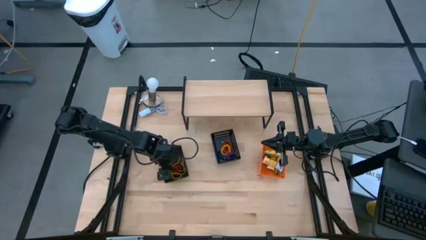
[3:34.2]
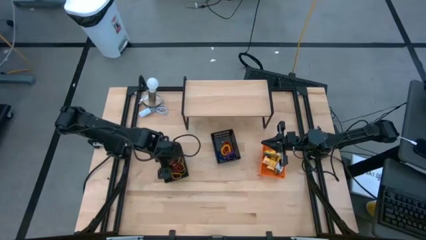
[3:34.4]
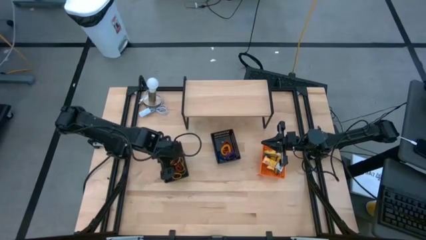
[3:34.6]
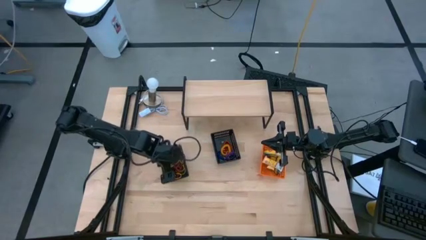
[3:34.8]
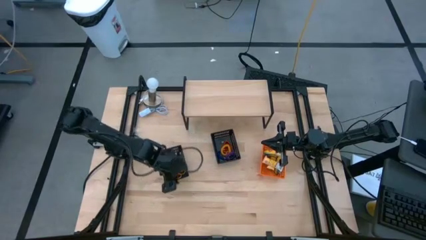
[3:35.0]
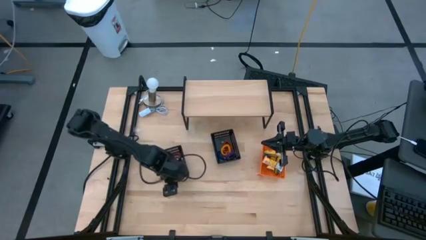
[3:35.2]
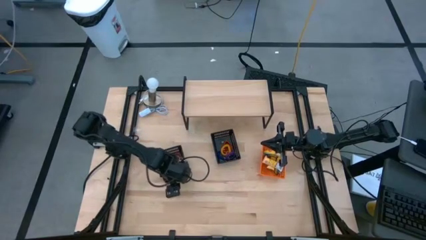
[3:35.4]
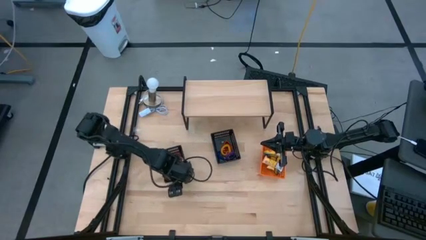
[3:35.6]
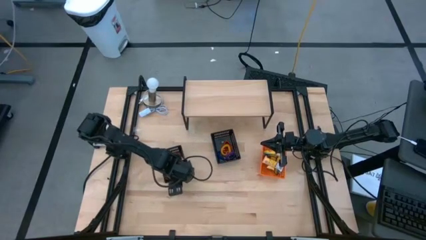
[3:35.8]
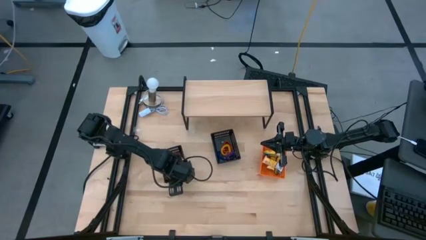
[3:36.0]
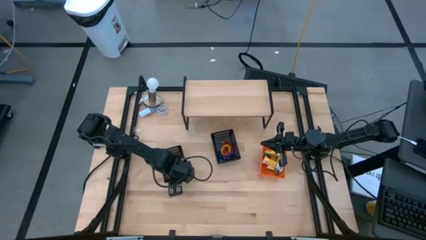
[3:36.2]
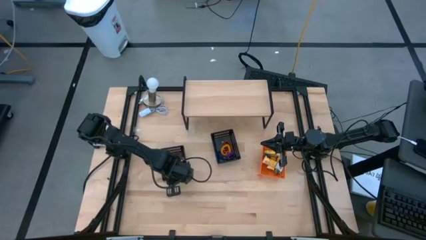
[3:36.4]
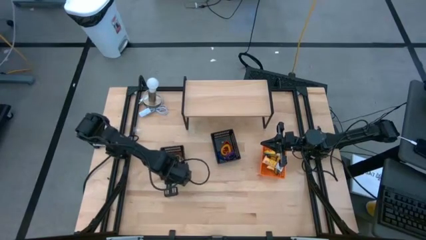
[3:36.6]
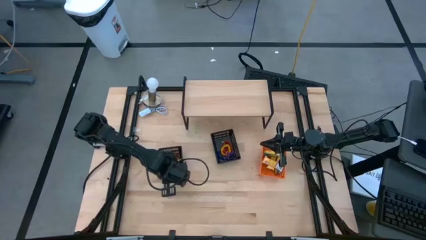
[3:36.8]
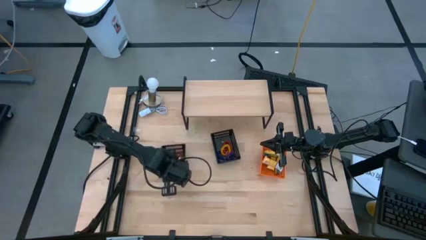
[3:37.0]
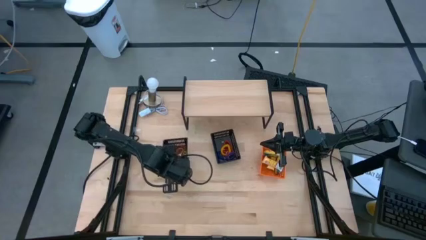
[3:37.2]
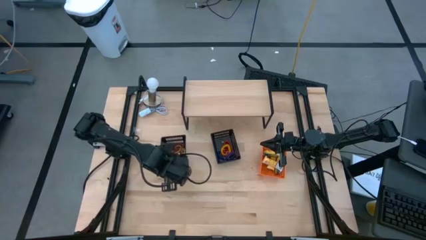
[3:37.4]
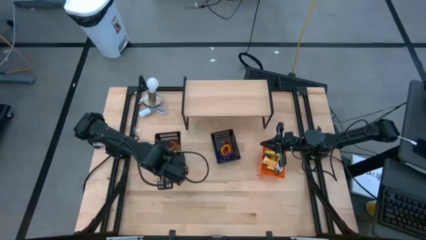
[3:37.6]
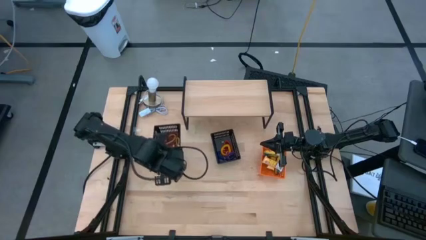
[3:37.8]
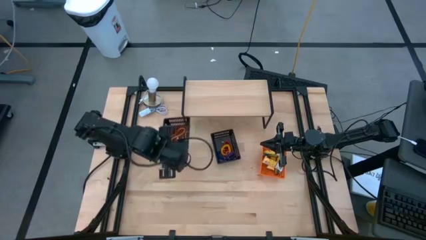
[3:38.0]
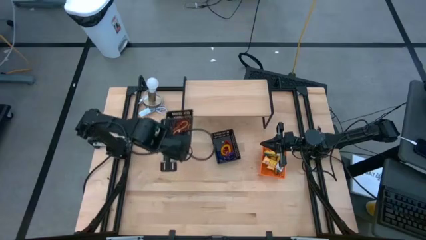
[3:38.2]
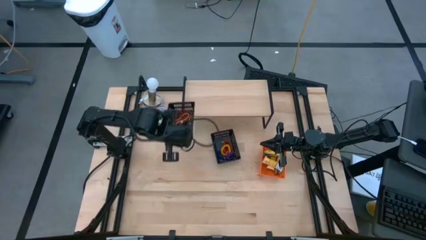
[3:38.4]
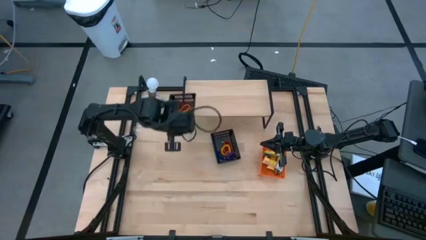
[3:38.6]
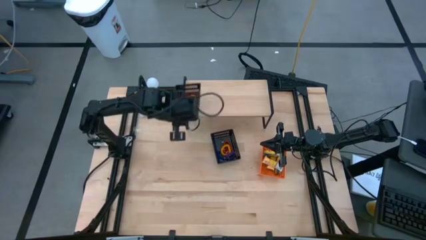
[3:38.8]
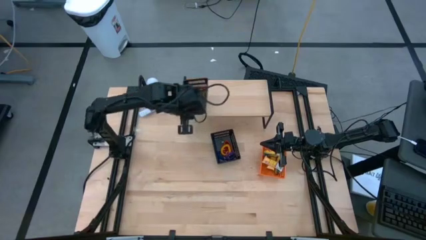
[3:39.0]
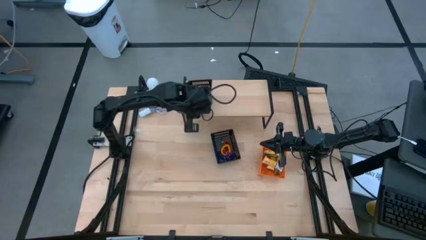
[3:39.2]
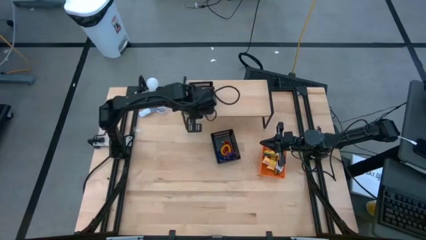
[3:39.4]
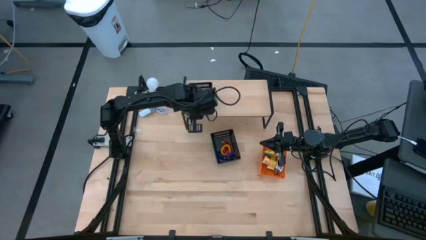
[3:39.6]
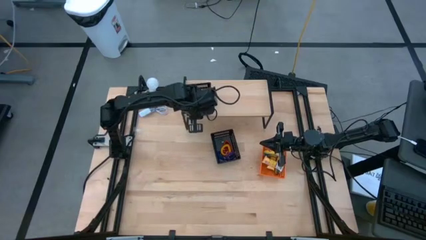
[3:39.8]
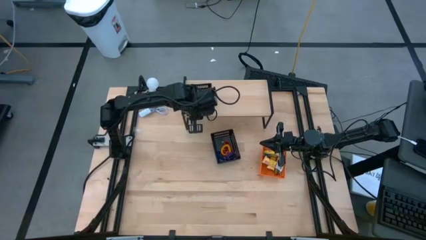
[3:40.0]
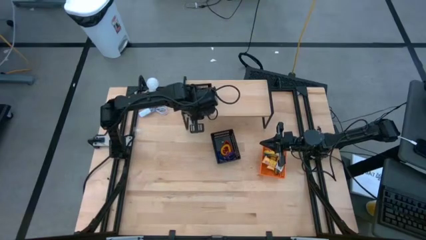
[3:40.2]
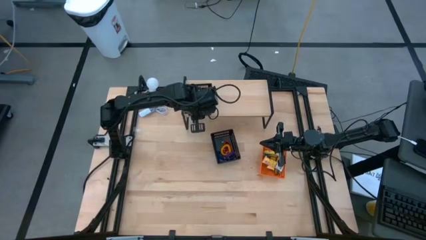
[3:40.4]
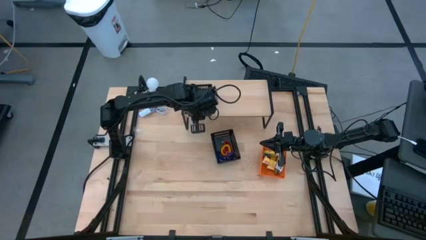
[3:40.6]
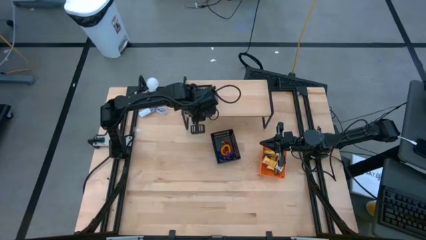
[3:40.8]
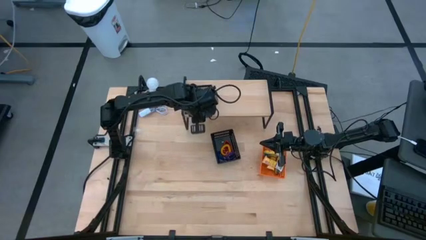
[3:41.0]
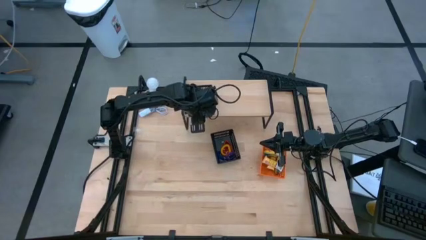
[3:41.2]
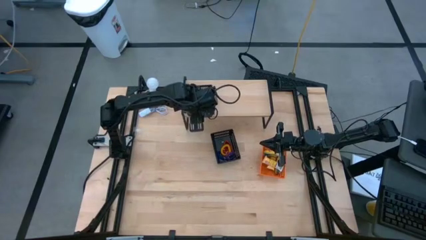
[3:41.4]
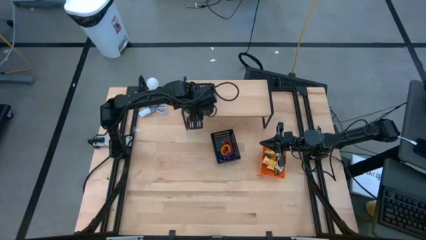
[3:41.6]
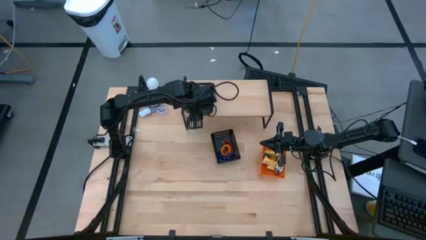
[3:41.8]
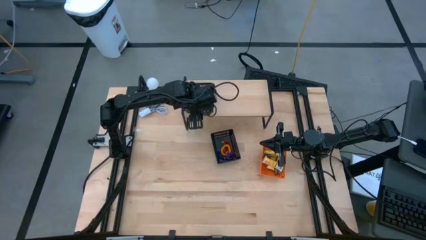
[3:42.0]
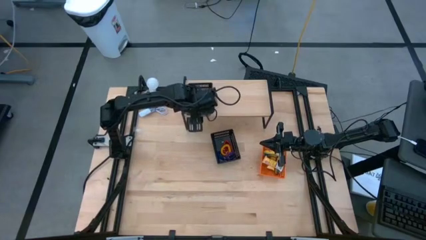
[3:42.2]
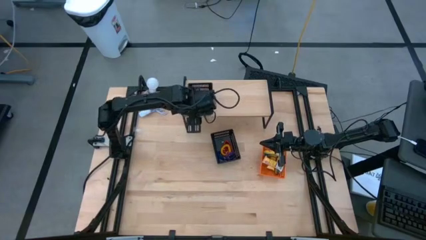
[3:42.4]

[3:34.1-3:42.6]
Task: Pick & Place Office Desk Supplies
Put the left black bin with the rubber bands on the shelf

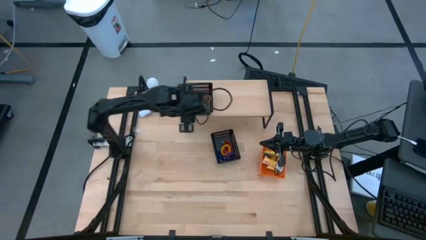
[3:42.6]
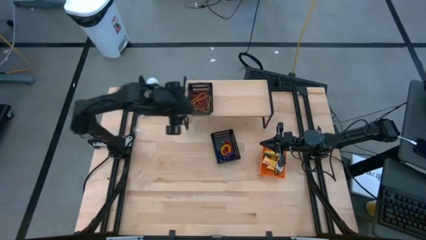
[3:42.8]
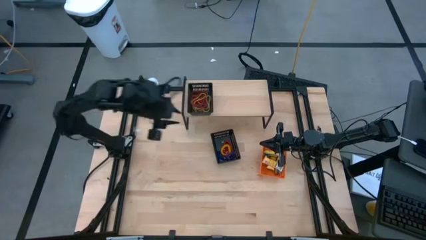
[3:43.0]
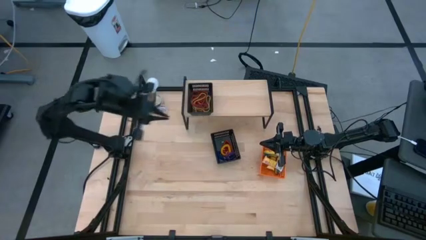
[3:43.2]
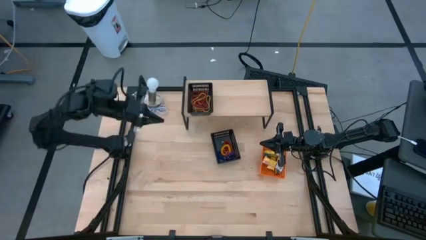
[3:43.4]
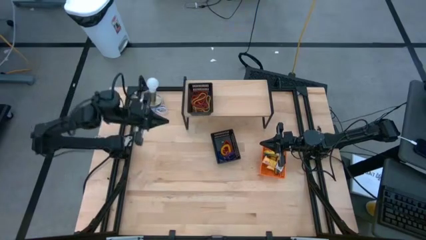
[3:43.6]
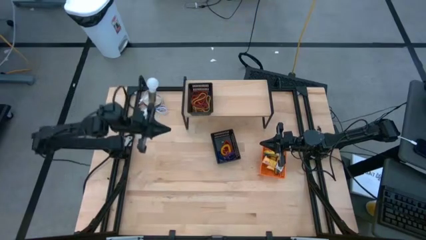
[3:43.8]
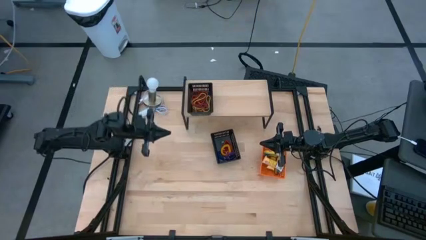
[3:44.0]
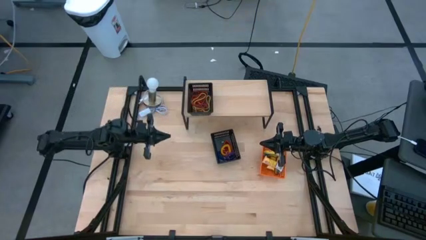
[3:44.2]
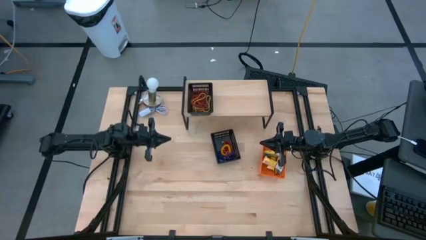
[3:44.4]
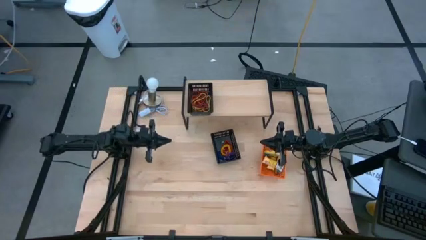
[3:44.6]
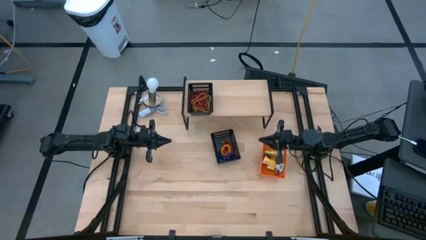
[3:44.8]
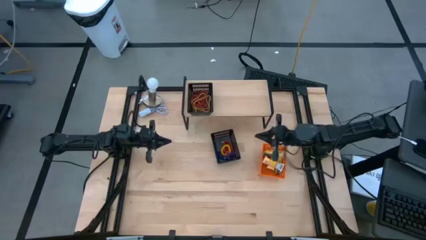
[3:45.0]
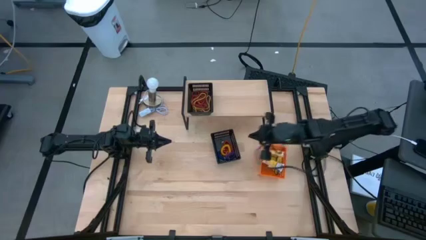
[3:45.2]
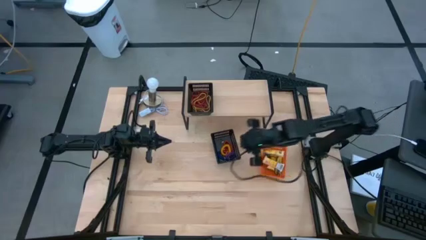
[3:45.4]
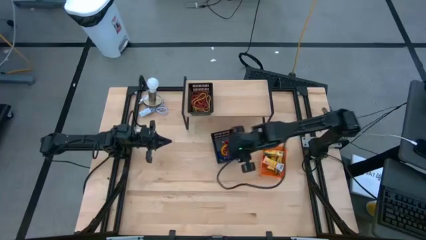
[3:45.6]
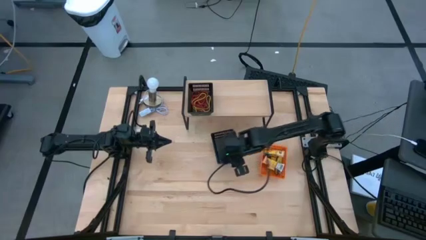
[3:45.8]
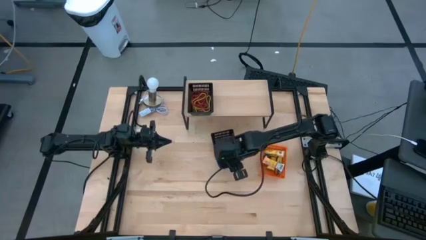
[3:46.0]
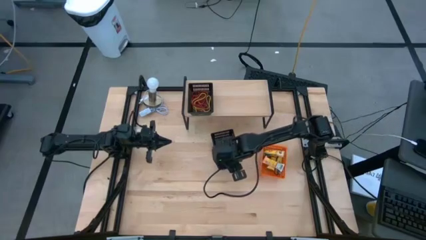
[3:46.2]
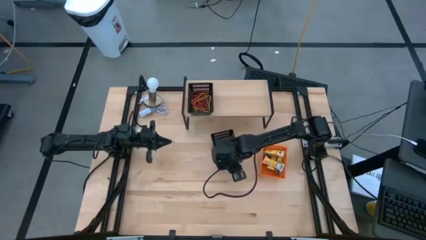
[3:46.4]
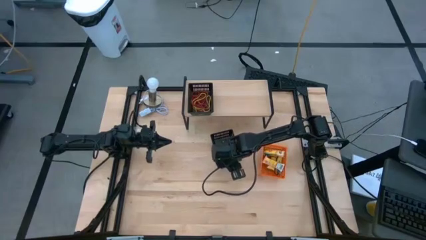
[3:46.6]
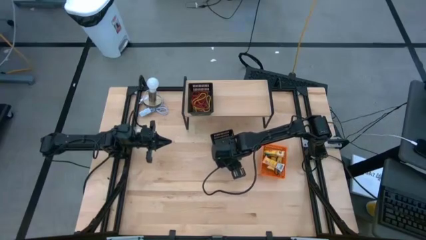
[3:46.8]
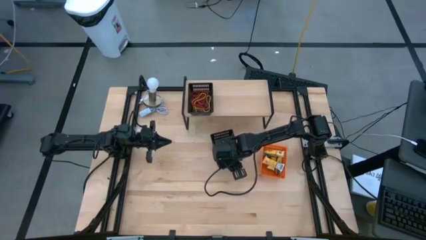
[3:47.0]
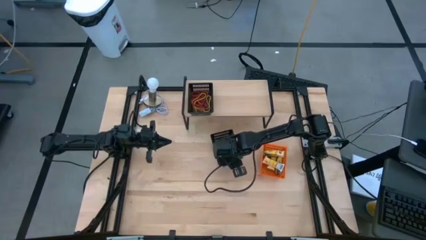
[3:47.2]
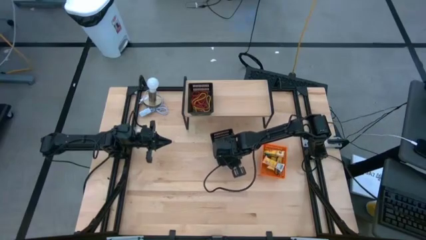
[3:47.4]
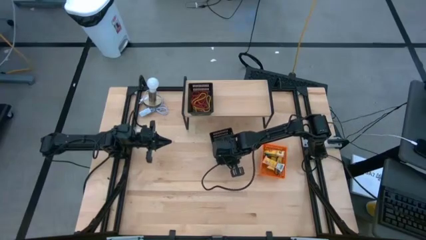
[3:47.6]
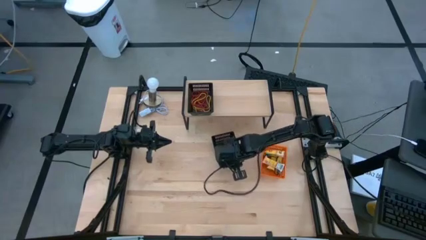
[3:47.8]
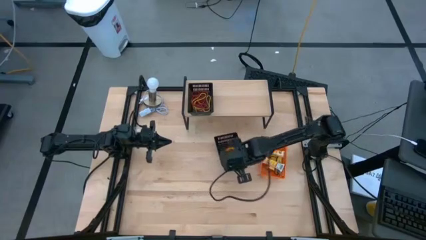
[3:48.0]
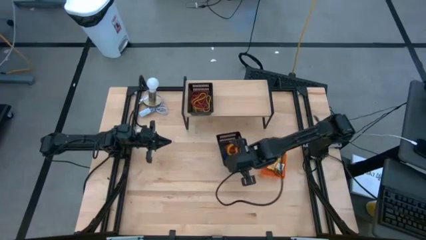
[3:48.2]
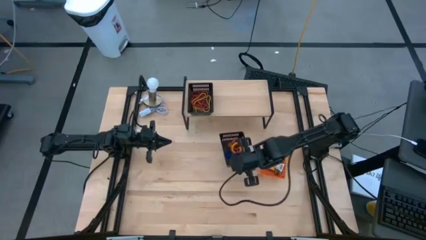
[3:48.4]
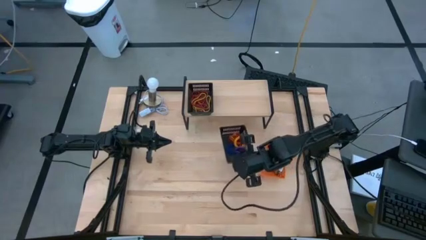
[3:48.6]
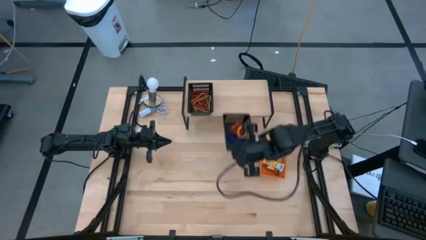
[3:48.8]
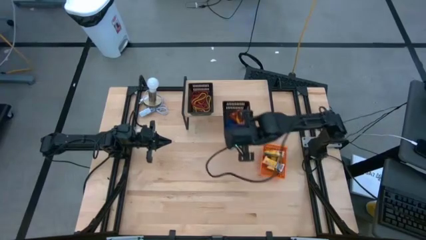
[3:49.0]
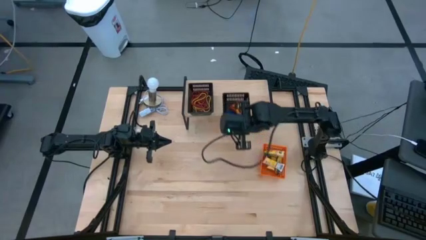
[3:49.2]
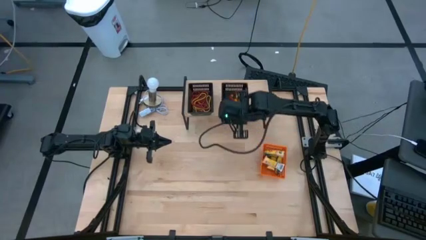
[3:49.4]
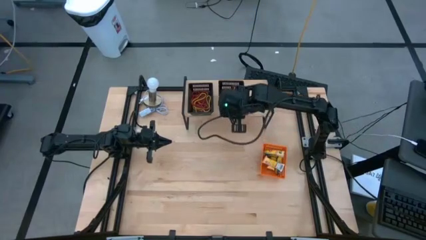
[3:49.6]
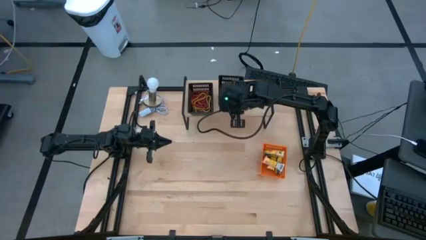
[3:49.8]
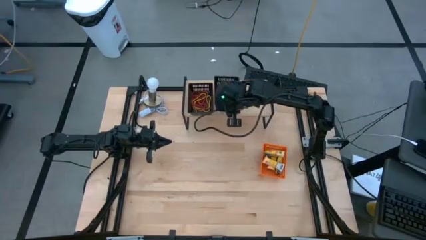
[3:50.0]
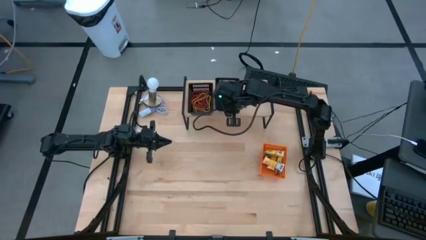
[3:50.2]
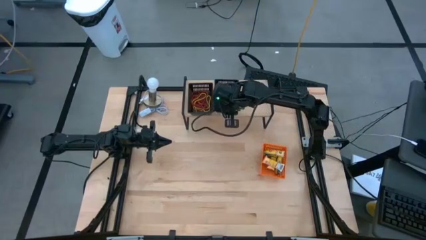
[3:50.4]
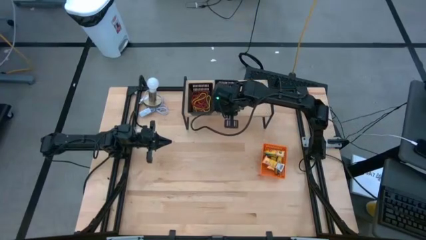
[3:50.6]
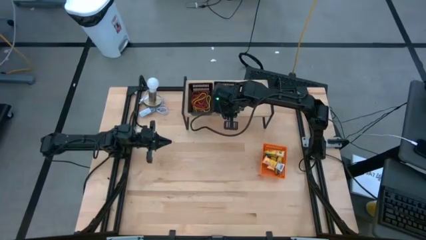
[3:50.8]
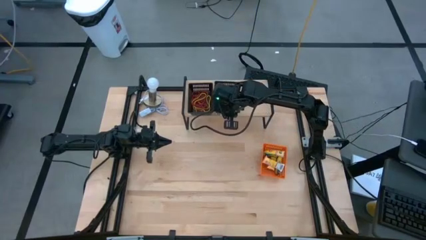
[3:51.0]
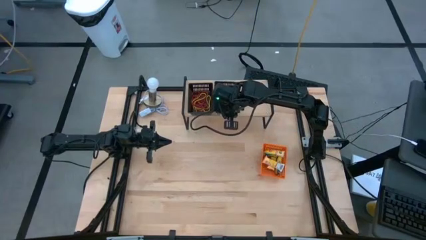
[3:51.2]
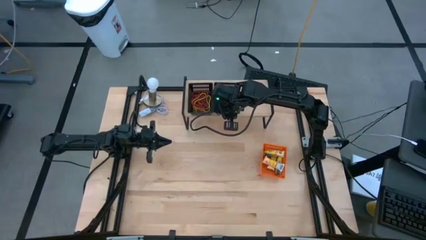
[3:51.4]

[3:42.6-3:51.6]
Put the black bin with the spring rubberbands on the shelf
